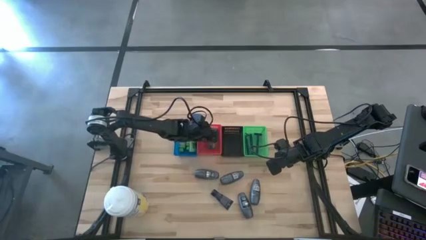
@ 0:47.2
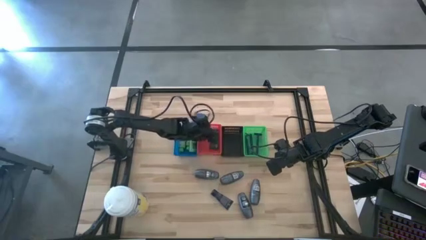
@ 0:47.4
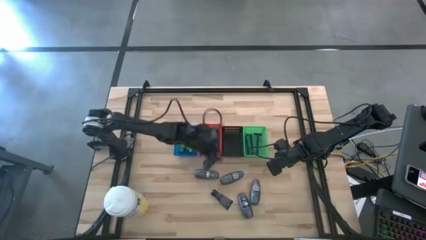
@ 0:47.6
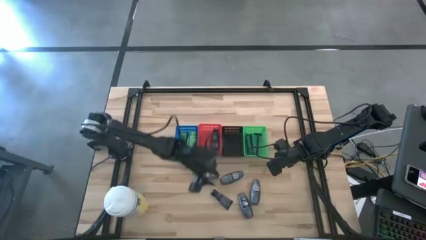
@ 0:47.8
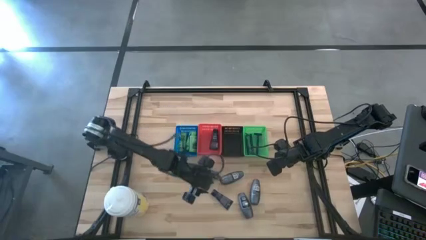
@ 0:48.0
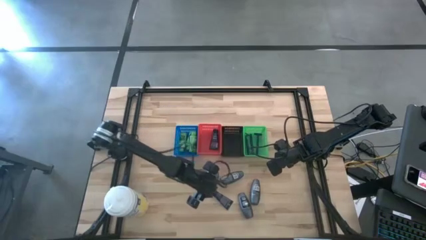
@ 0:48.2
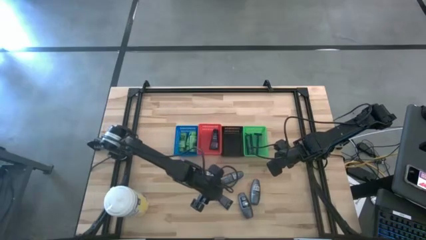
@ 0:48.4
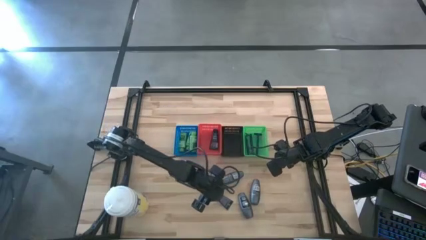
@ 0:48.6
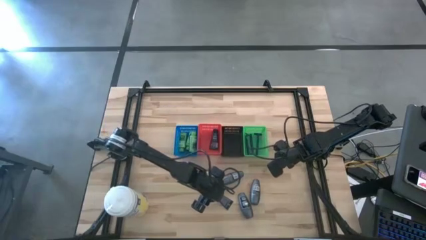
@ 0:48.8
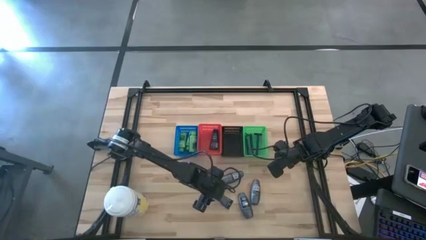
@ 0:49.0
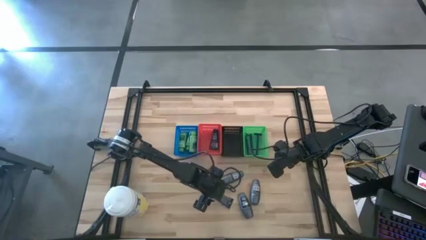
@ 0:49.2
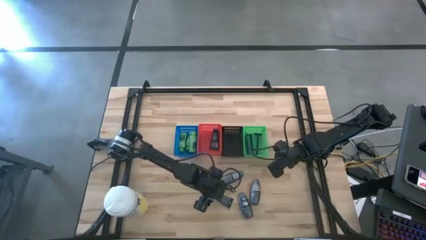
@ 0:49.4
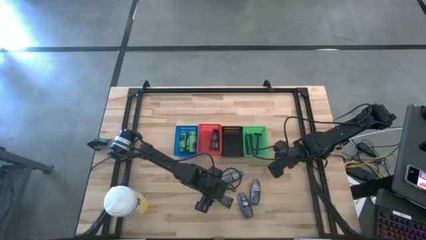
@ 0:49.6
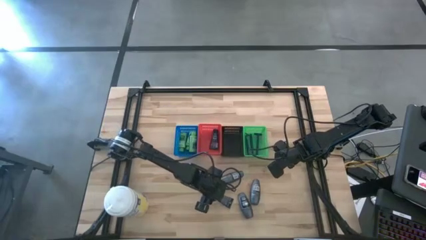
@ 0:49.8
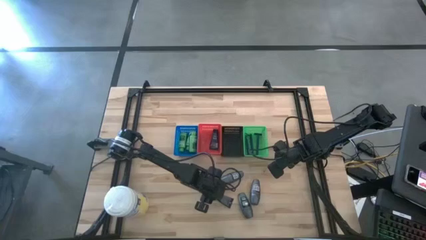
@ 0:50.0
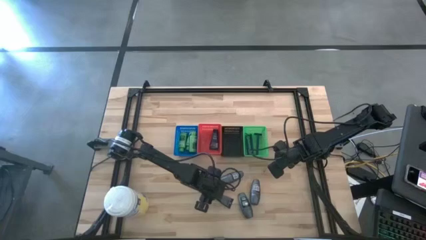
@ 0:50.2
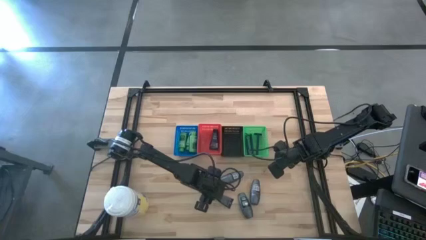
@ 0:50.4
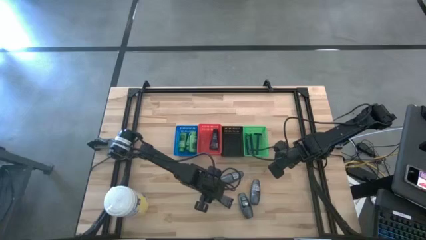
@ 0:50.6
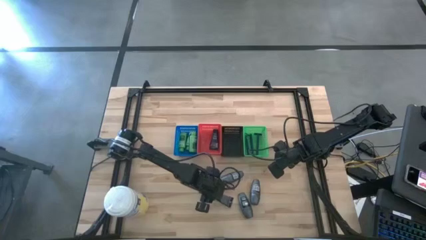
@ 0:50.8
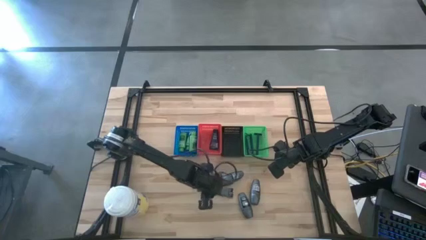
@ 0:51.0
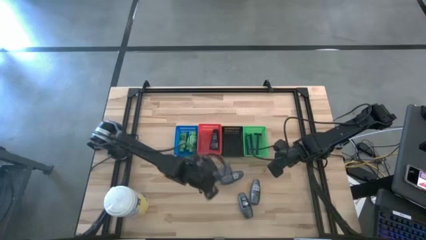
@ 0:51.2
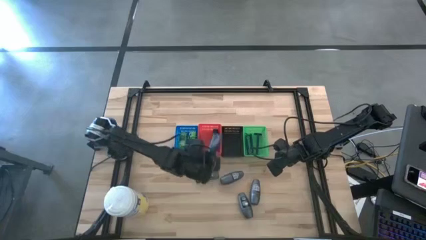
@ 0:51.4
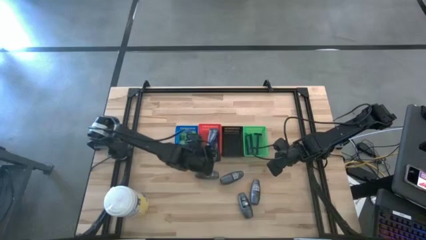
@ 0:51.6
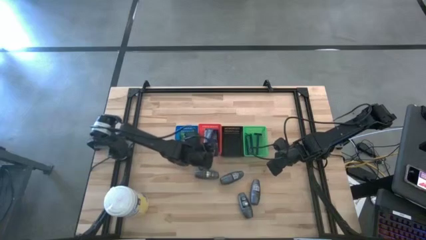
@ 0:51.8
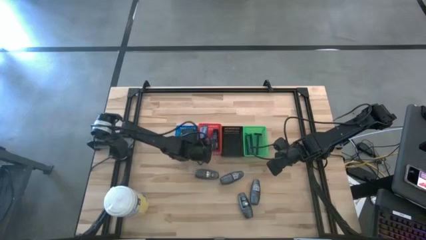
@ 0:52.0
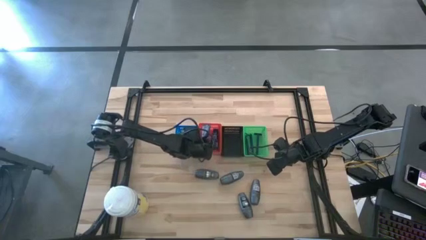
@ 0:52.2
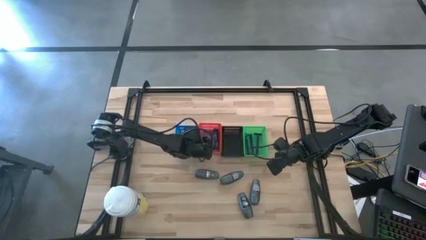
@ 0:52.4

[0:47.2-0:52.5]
Task: Pick & Place Travel size toiletries
Put the shave cream into the red basket

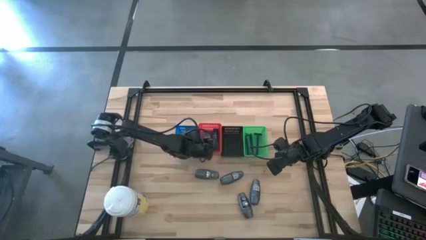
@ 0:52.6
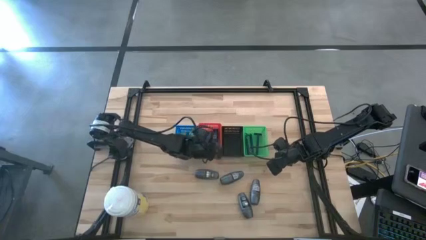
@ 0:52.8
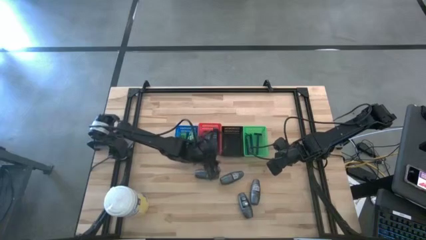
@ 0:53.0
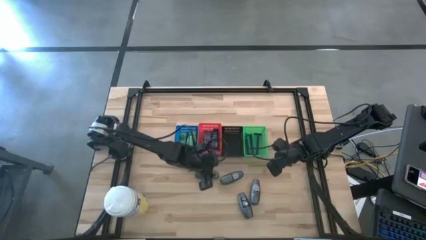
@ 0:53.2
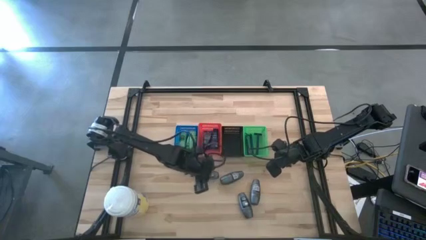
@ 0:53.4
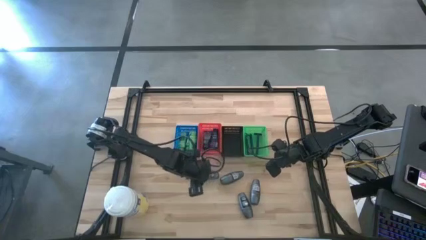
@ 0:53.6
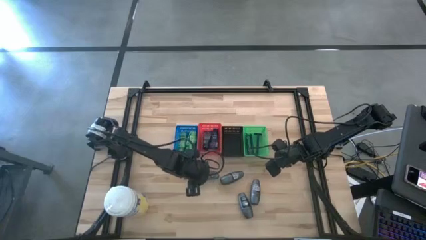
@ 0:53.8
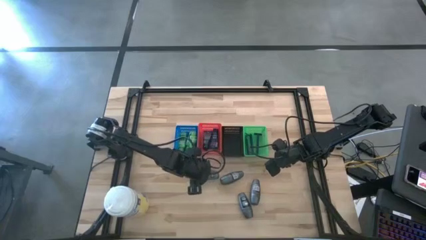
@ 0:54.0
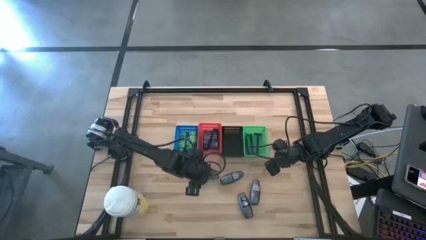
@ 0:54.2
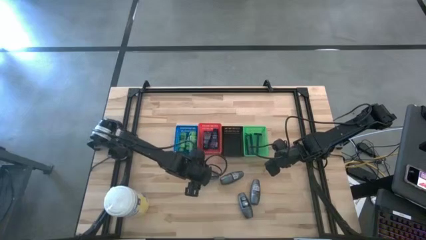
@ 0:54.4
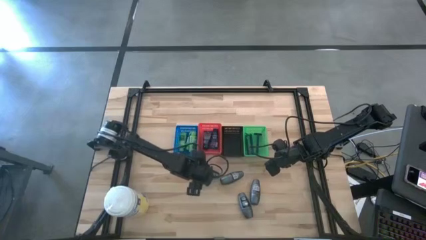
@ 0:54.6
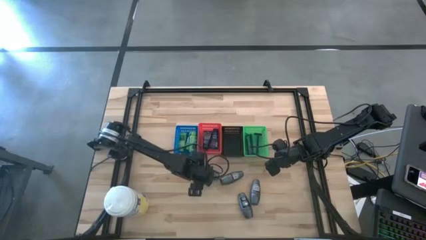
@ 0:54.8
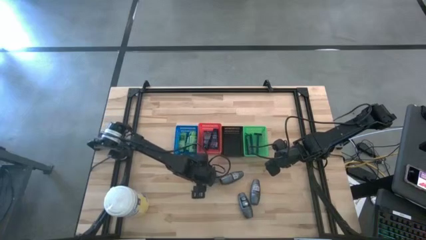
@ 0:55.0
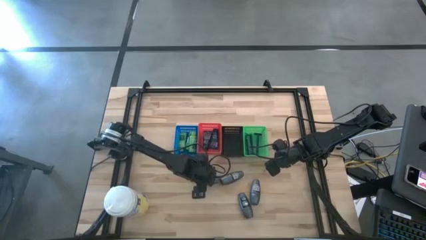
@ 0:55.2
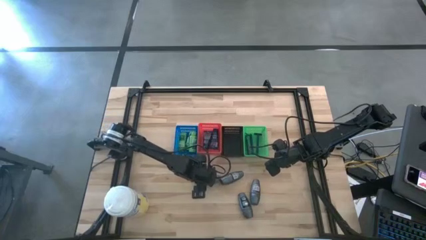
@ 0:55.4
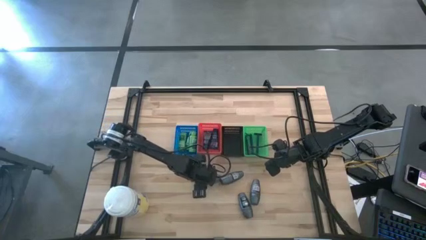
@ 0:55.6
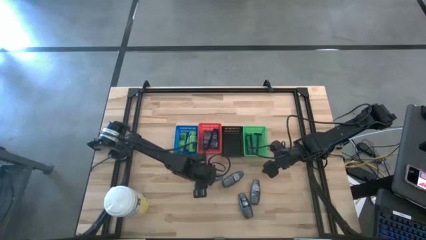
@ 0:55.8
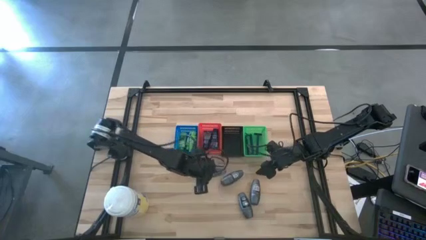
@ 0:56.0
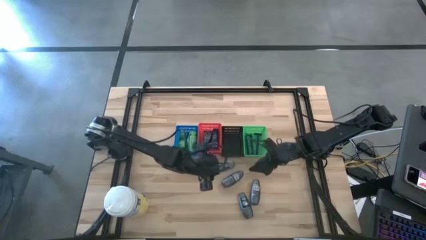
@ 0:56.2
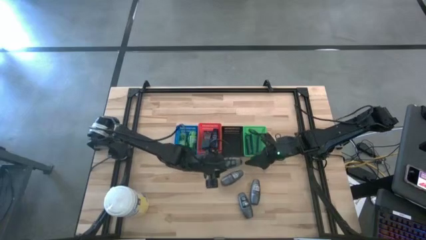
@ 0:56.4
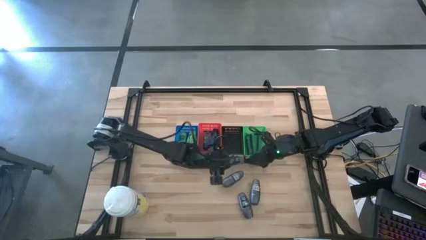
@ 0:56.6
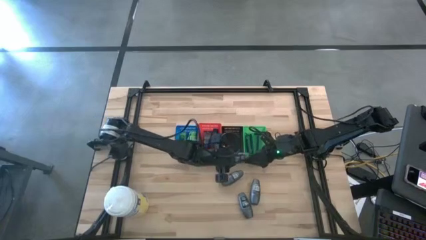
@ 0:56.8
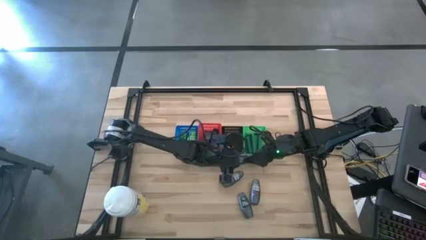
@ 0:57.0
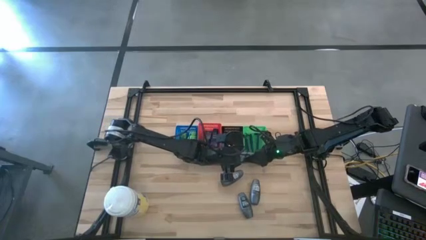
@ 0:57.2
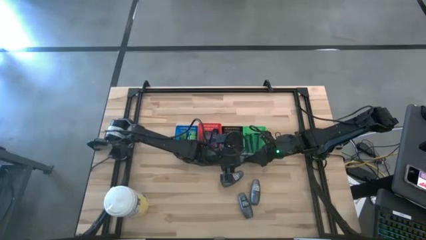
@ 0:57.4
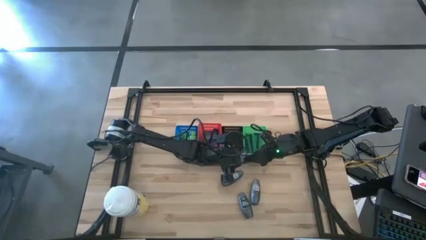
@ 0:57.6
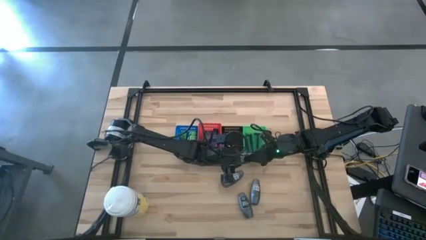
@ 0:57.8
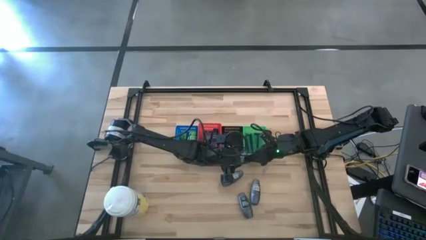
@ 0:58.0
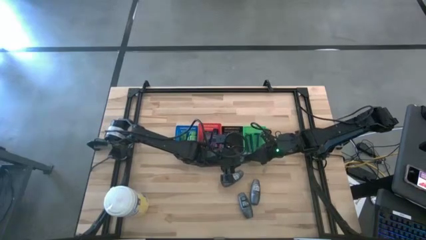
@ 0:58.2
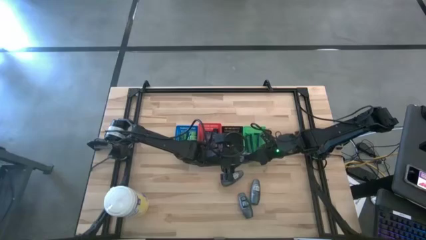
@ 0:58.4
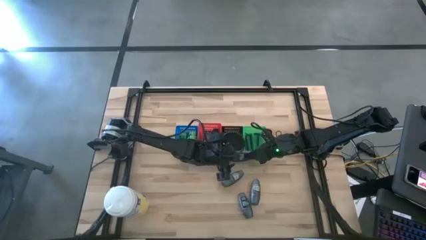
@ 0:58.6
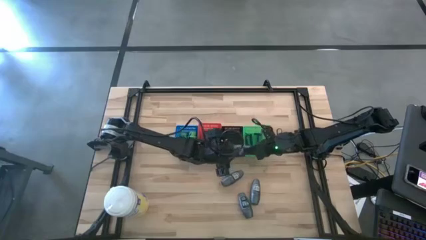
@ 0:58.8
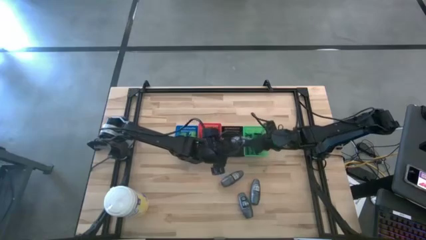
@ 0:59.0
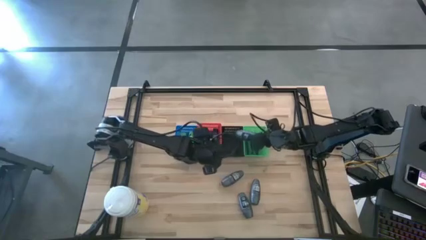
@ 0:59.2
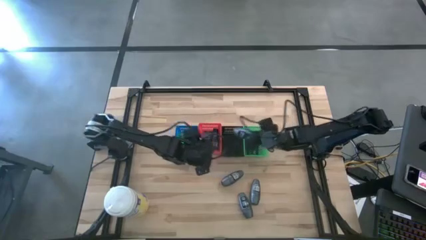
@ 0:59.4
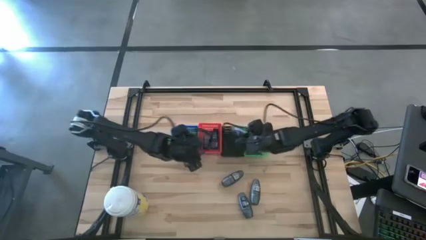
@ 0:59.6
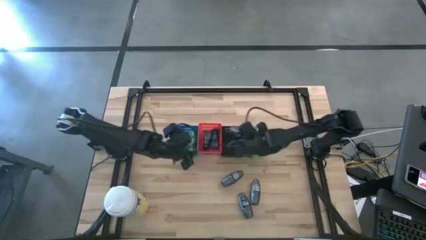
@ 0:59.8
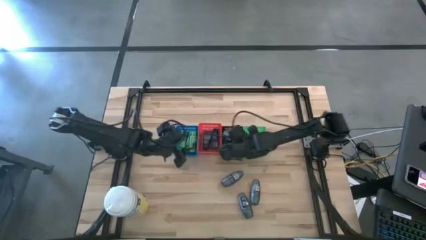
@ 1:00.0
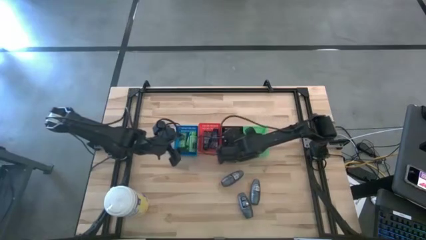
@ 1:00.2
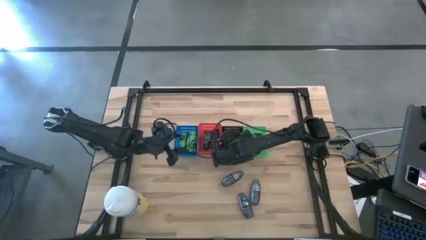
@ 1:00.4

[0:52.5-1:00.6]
Put the deodorant into the black basket

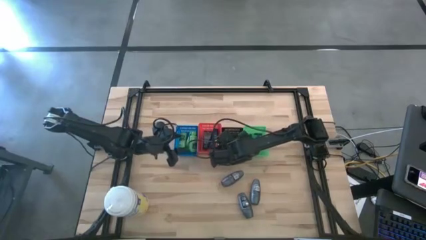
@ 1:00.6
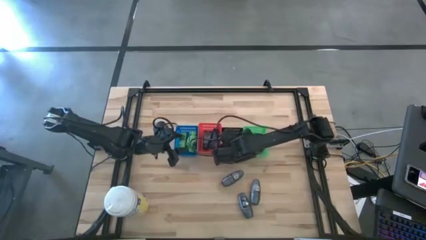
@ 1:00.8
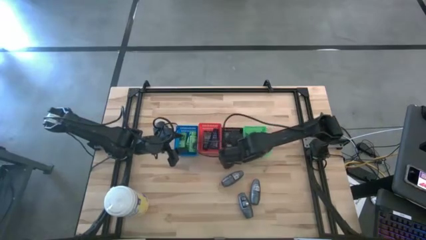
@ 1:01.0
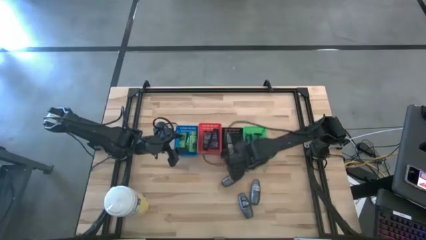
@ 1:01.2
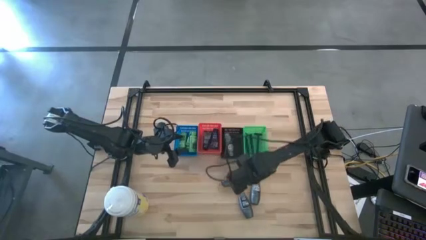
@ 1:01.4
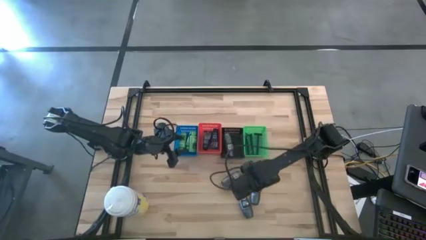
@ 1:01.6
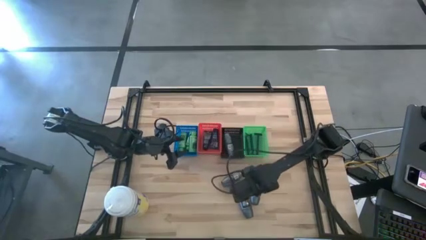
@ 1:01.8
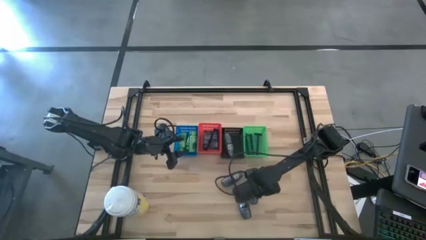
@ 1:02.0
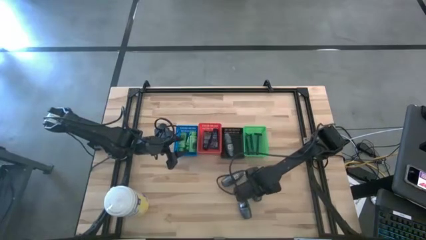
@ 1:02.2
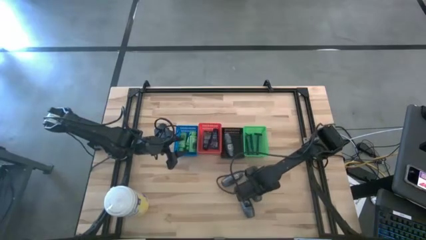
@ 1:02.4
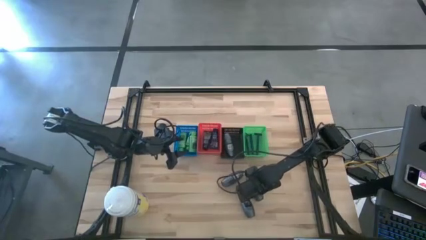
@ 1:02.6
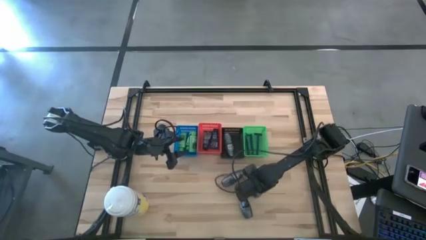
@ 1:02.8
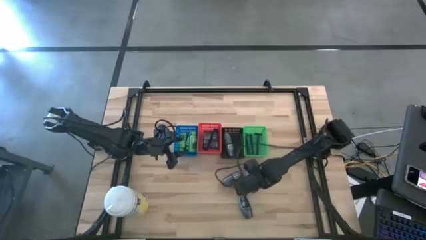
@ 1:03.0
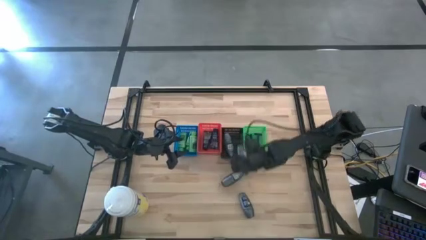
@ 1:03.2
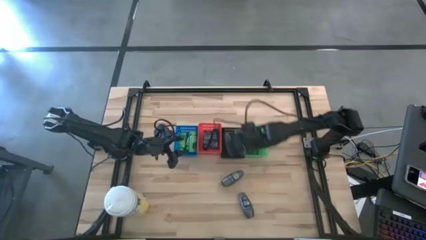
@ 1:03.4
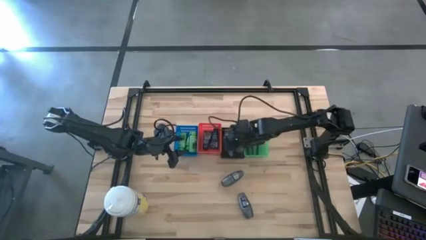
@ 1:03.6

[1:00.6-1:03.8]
Put the deodorant into the black basket
